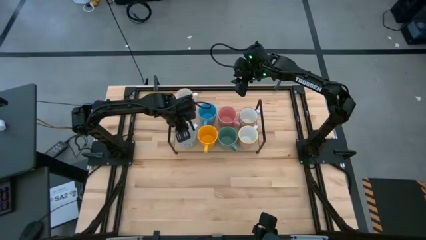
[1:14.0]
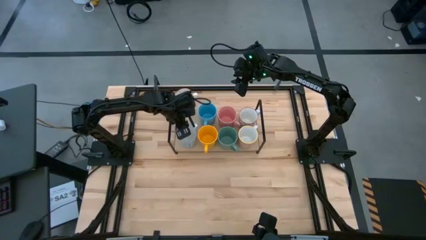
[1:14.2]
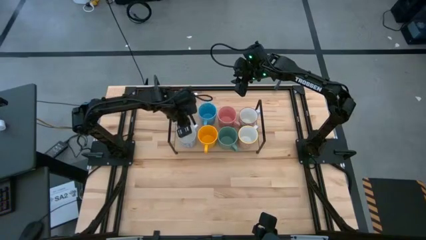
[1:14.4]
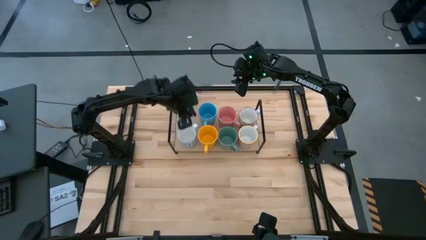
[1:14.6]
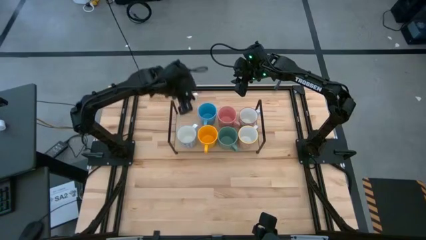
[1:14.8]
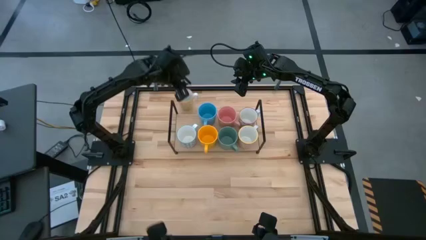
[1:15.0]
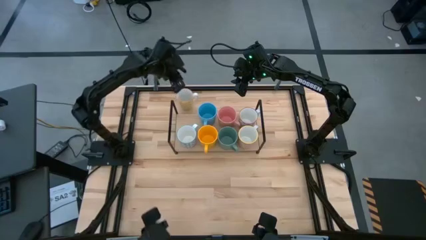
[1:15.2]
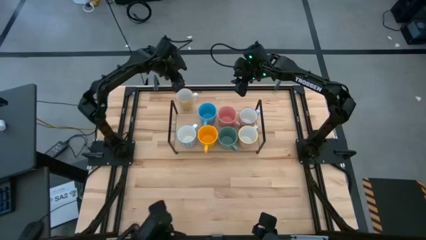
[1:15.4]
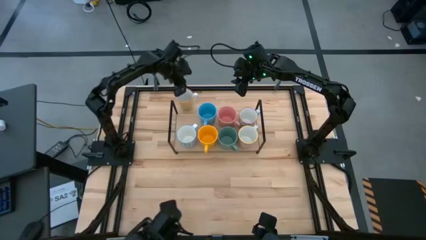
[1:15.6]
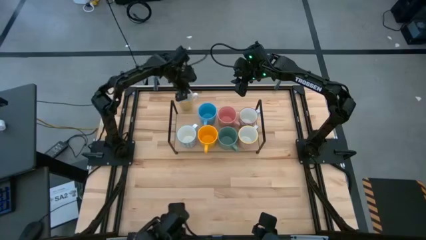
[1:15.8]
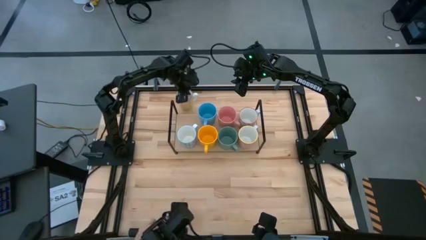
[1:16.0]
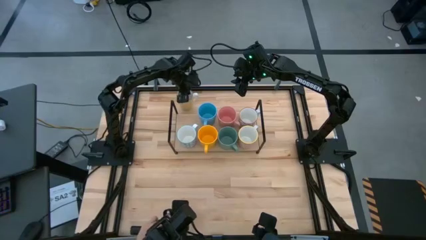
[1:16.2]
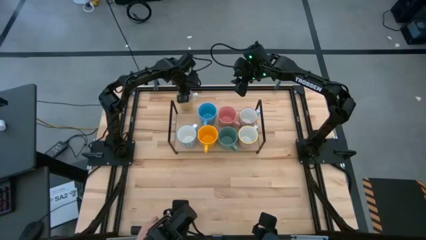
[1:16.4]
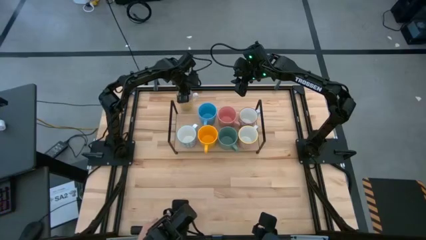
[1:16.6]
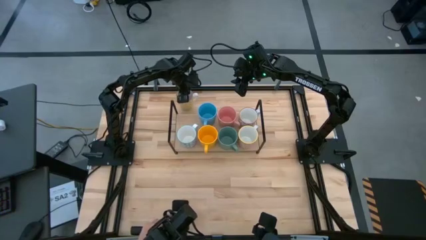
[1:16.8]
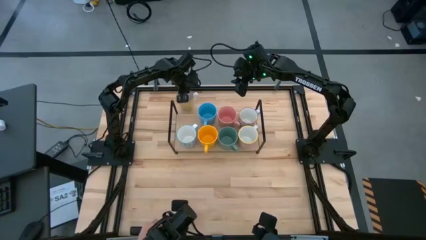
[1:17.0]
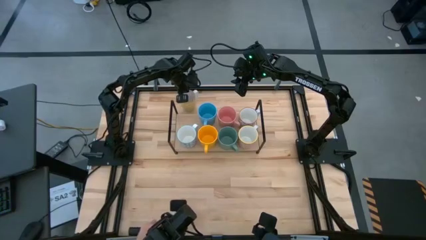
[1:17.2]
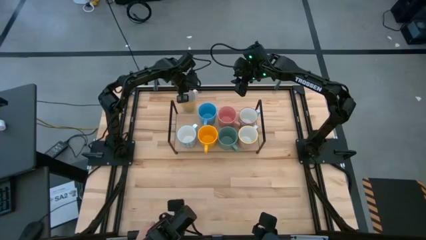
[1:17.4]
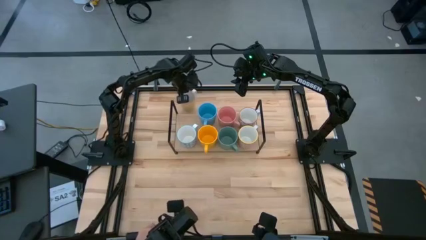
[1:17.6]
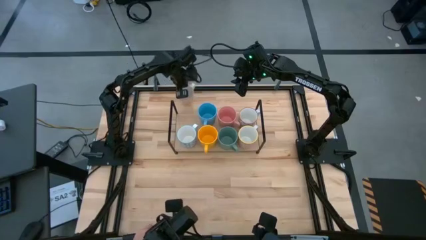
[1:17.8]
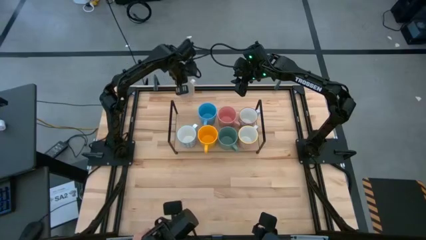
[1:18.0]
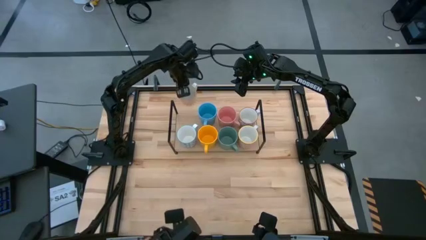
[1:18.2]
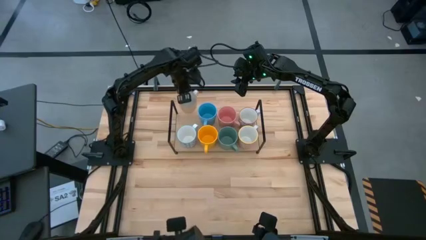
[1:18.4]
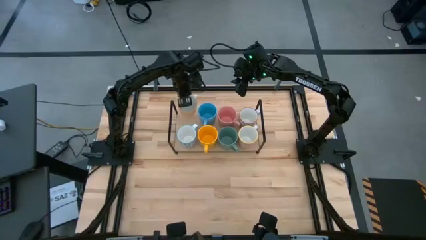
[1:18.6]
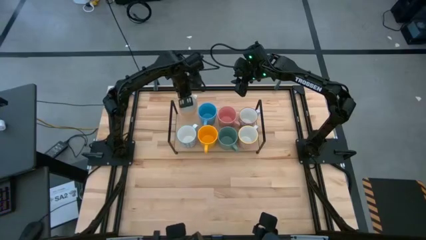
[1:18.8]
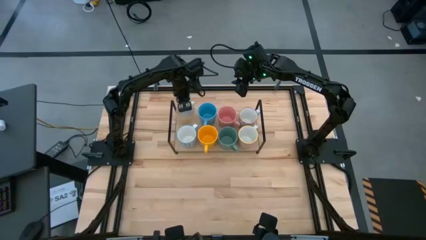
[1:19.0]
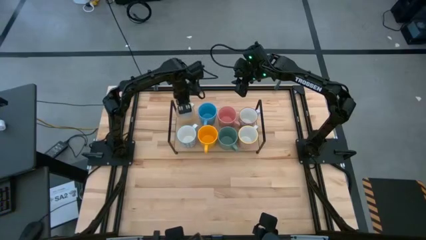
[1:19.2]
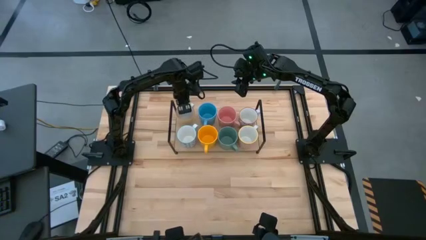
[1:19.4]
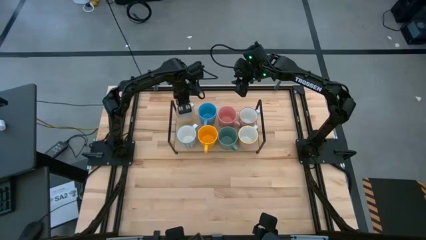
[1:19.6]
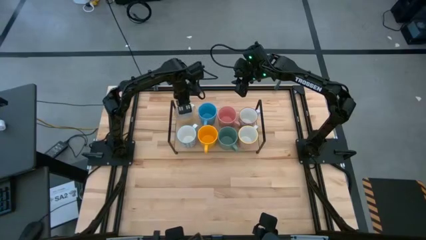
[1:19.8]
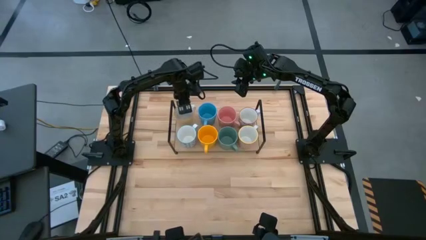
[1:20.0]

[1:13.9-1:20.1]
Task: Place coffee mugs
Put the yellow patterned mug on the shelf

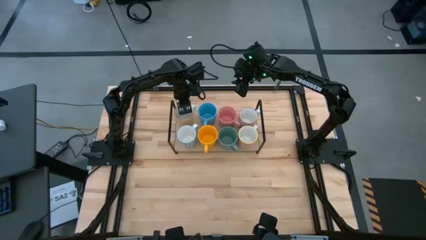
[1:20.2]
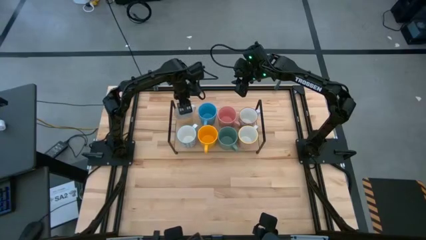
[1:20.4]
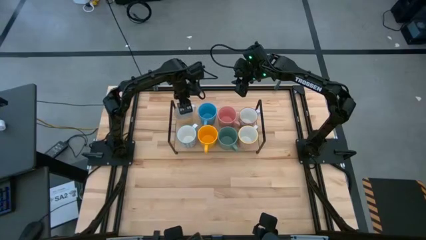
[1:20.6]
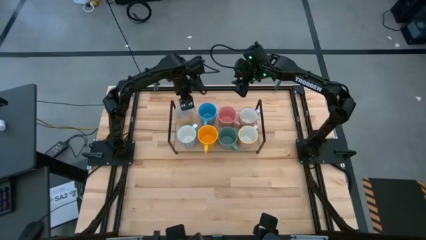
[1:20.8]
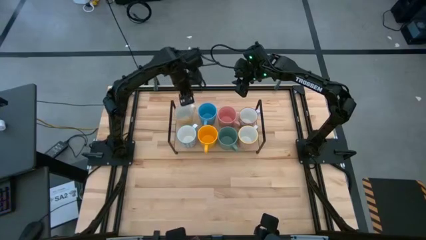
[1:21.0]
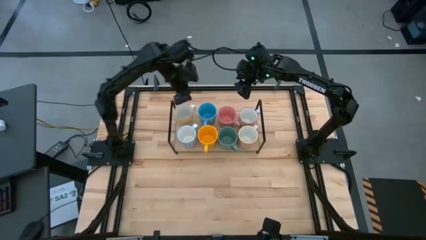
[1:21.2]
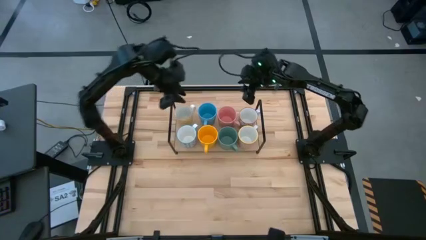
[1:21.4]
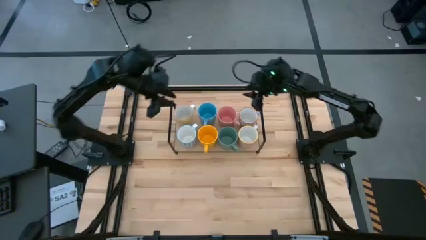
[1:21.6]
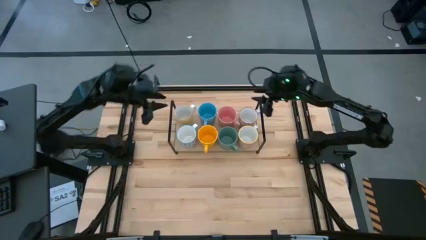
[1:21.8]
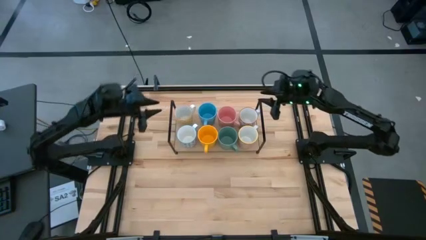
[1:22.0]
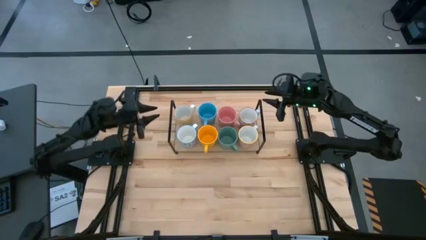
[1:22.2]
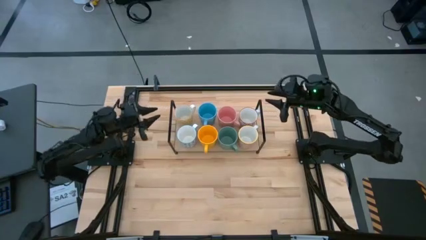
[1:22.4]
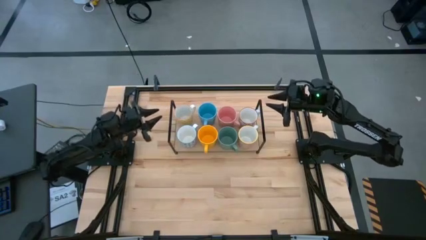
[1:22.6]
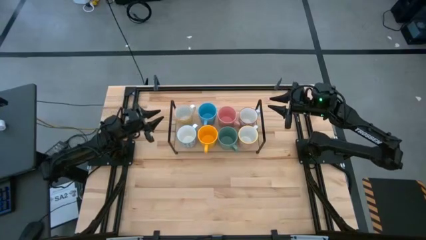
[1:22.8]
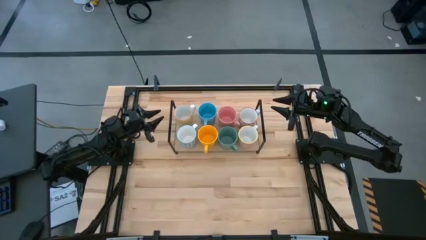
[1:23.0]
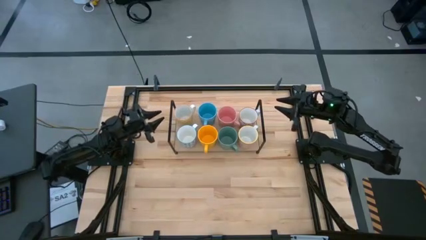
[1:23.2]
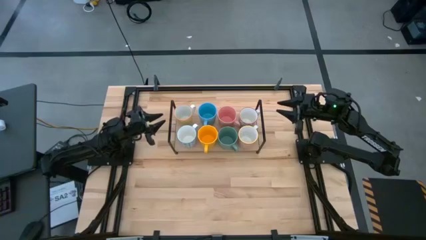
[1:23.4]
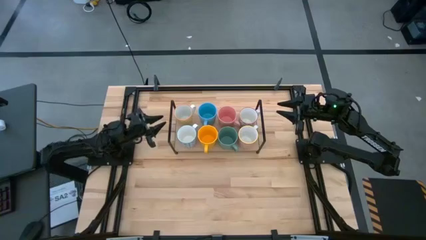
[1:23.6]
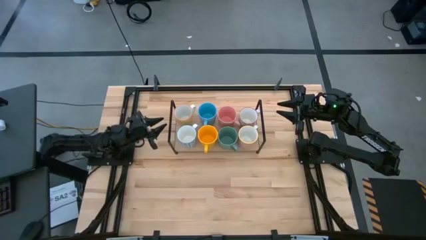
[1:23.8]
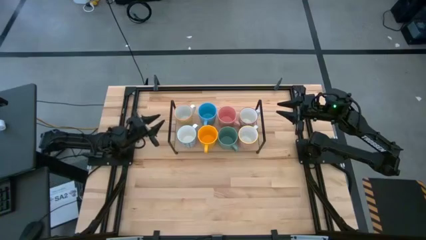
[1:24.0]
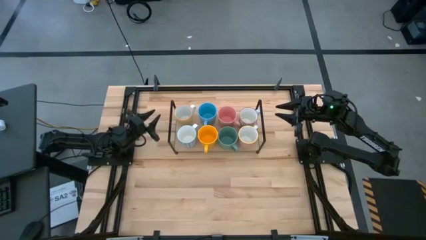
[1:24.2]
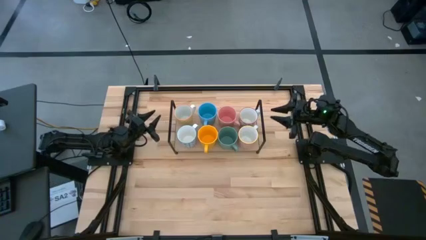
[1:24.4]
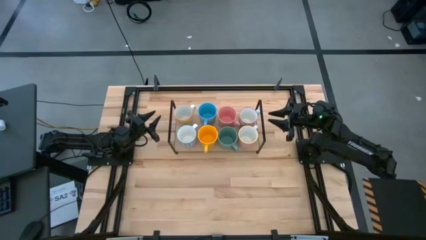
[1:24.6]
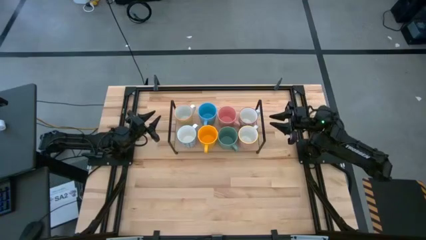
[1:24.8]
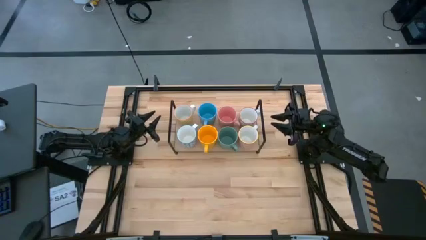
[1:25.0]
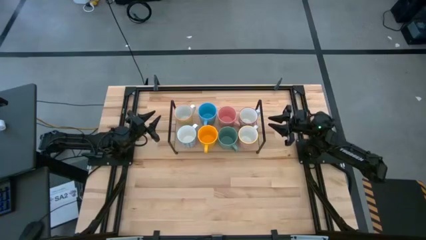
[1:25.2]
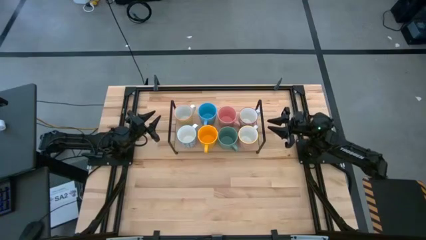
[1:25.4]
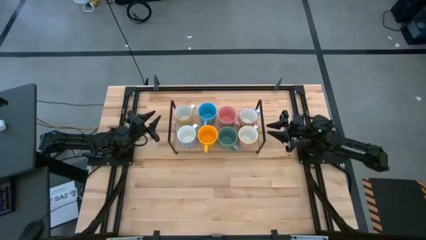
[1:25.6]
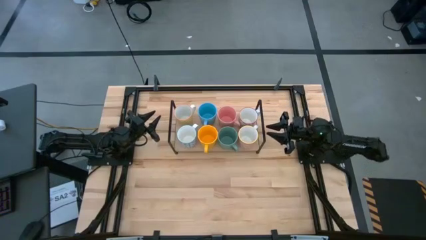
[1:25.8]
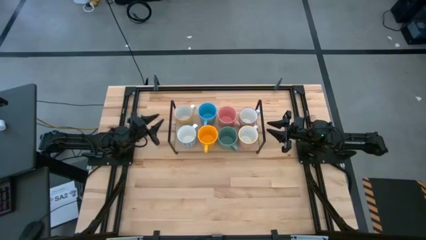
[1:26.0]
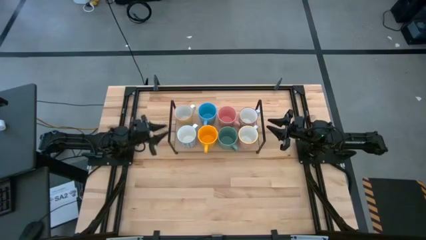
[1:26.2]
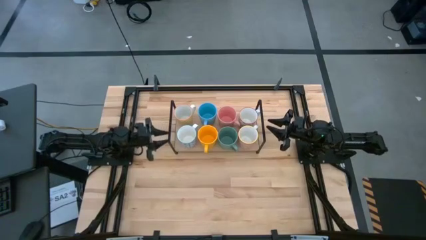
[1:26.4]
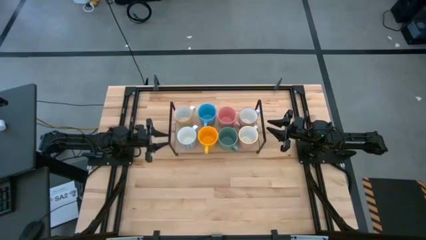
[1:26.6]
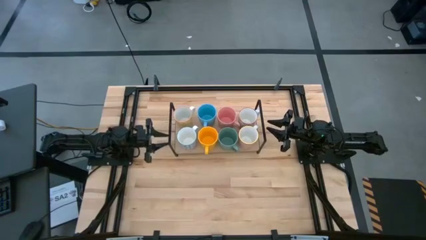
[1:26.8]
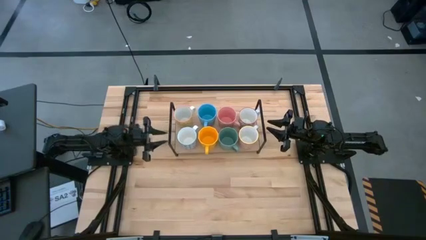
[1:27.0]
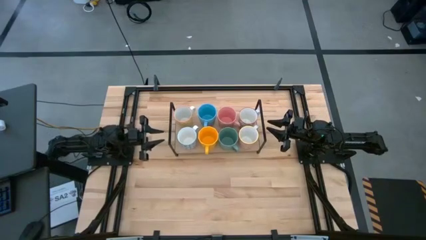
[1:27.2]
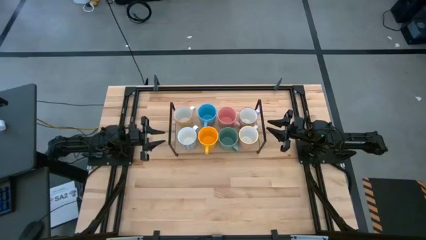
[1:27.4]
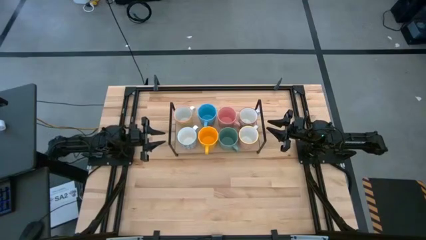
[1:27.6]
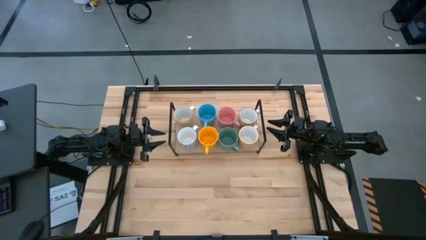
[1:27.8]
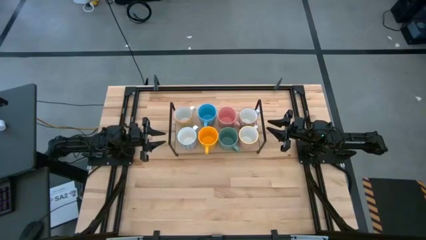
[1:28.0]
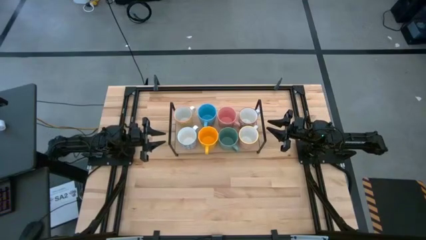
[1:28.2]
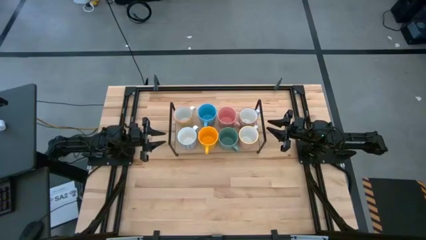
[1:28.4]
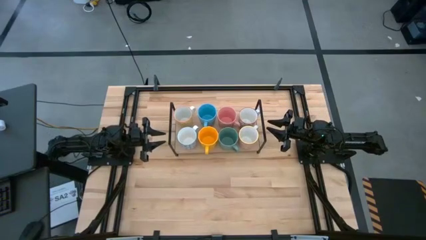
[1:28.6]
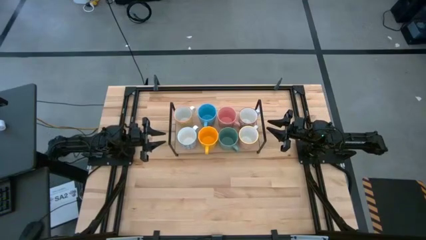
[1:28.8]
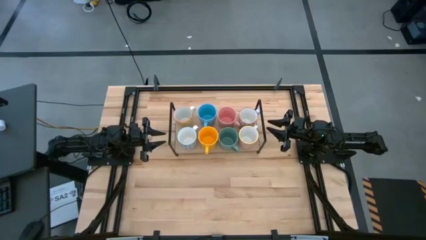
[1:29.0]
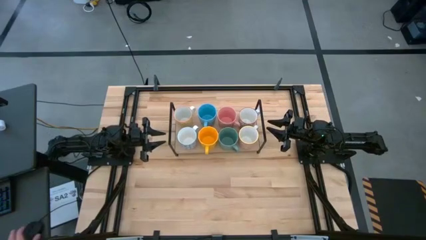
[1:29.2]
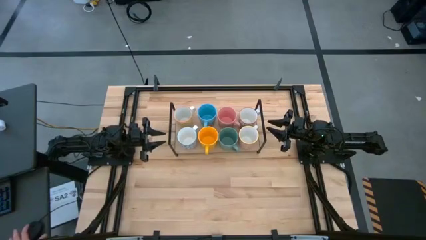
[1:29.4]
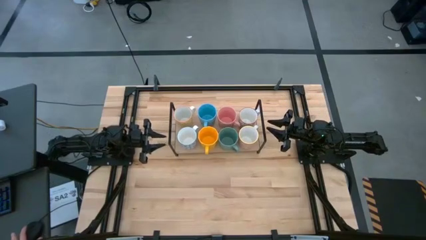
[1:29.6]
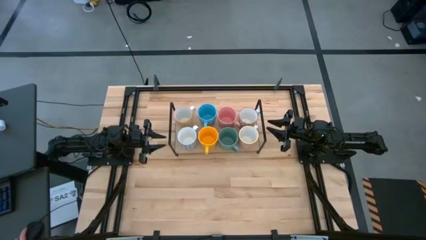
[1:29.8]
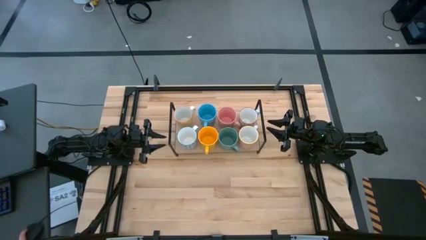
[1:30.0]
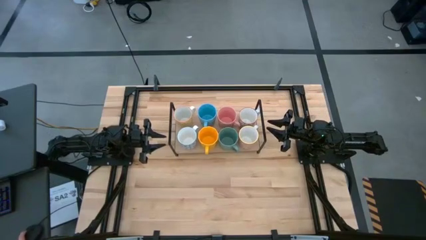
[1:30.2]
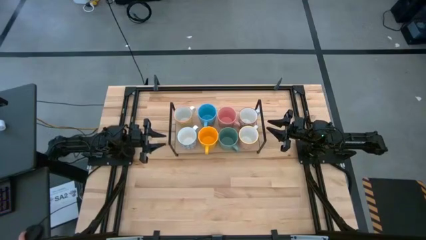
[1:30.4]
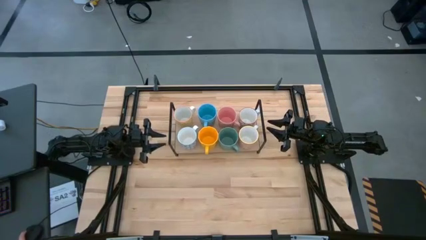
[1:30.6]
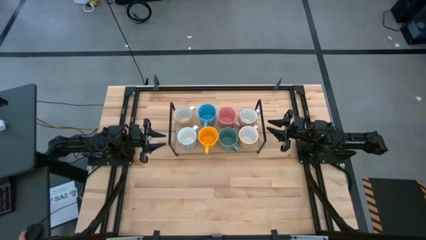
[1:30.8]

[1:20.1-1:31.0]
Return to Home Position
